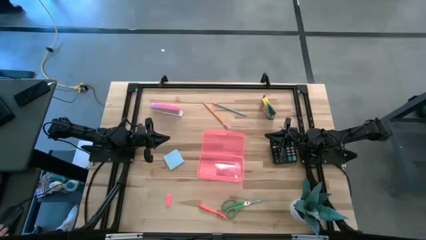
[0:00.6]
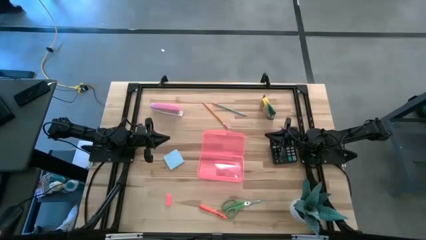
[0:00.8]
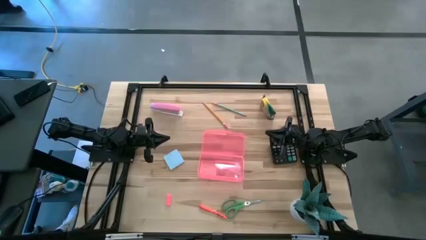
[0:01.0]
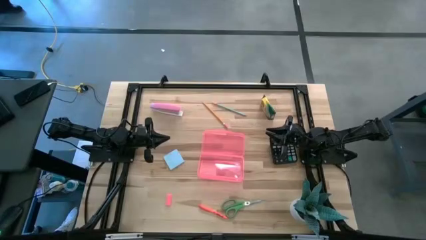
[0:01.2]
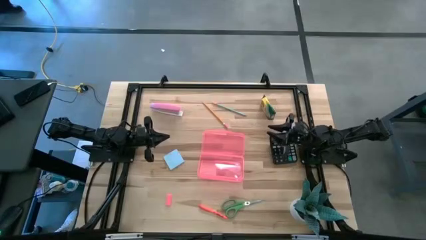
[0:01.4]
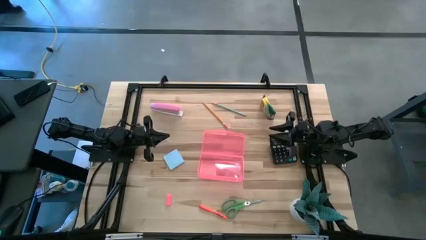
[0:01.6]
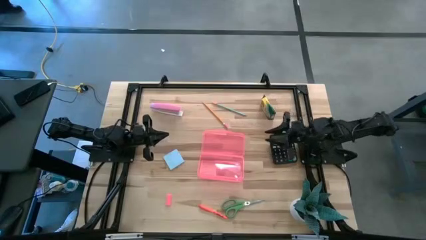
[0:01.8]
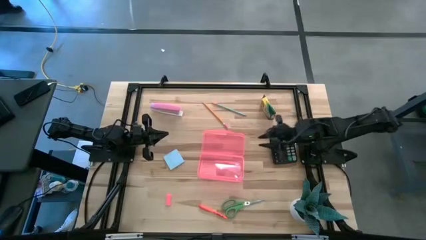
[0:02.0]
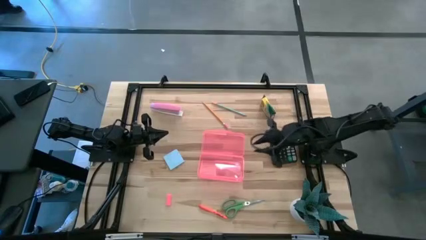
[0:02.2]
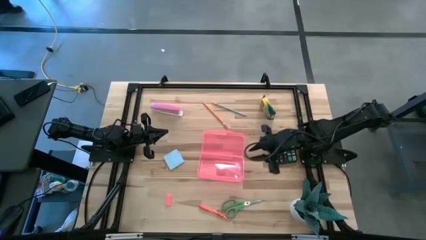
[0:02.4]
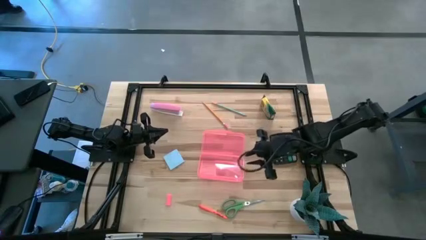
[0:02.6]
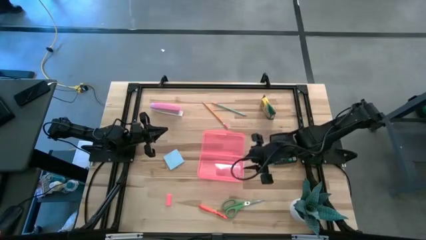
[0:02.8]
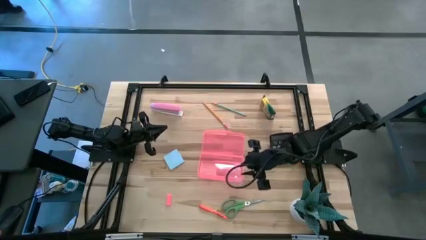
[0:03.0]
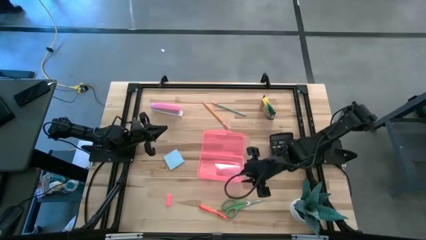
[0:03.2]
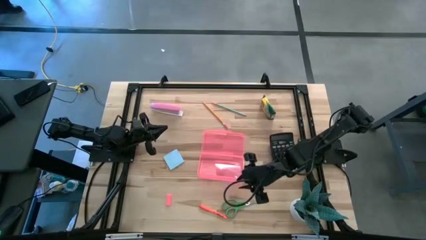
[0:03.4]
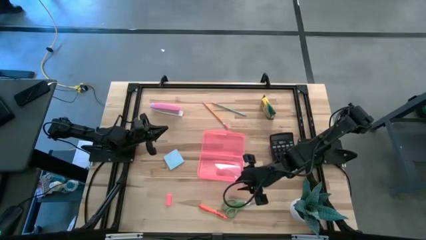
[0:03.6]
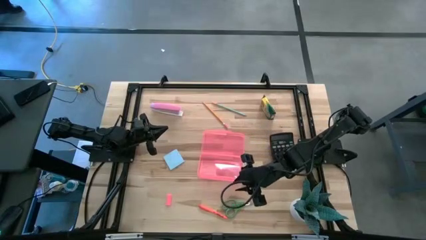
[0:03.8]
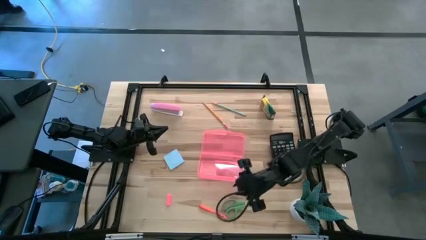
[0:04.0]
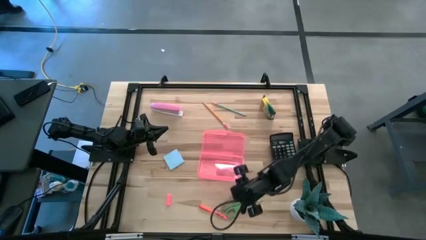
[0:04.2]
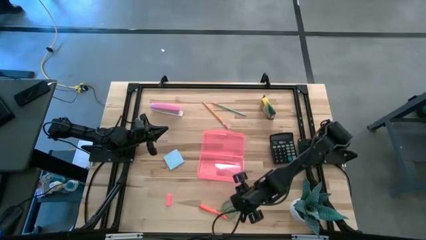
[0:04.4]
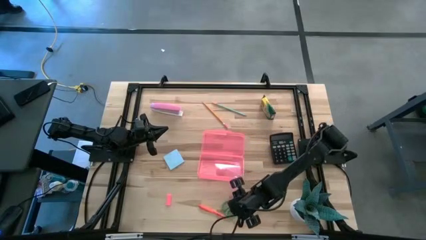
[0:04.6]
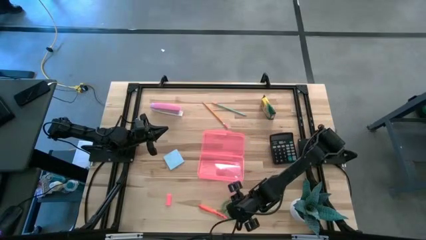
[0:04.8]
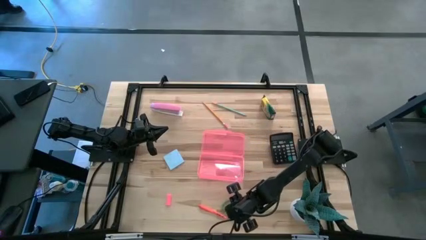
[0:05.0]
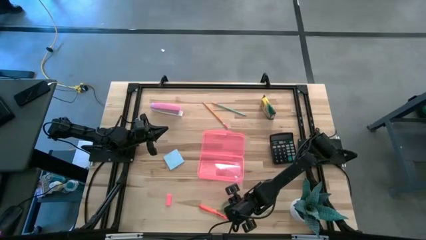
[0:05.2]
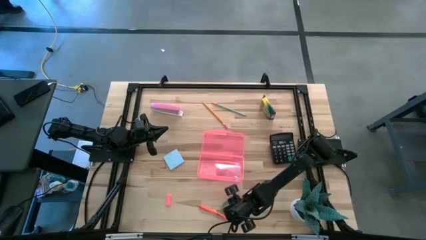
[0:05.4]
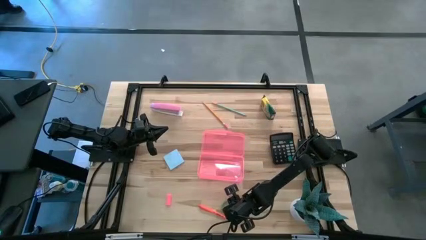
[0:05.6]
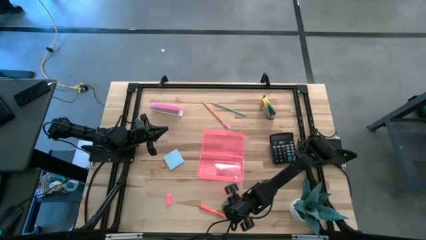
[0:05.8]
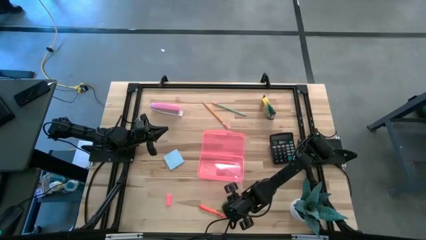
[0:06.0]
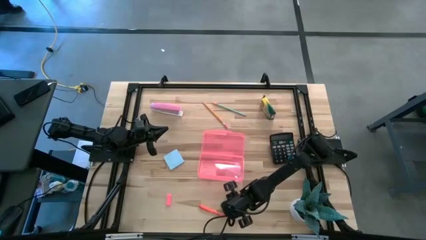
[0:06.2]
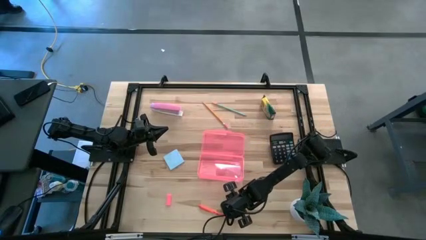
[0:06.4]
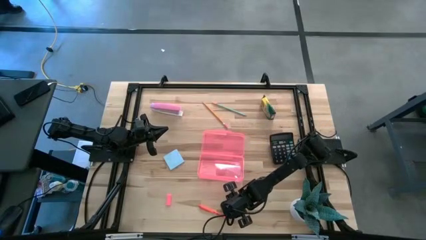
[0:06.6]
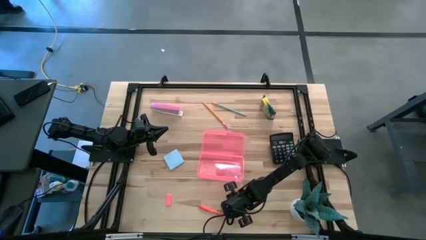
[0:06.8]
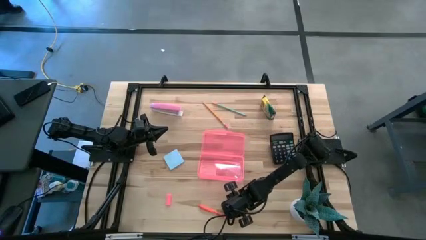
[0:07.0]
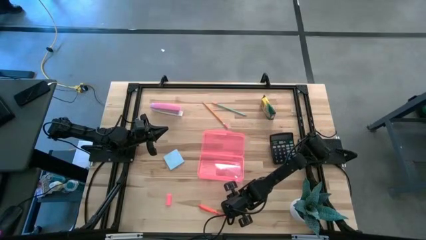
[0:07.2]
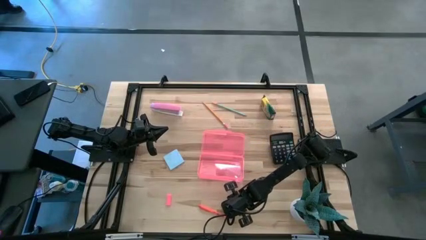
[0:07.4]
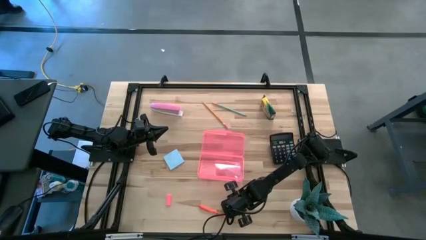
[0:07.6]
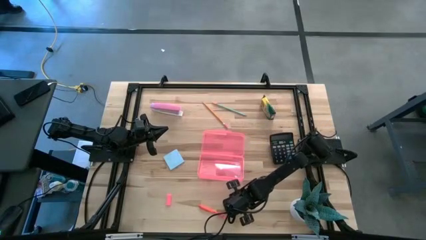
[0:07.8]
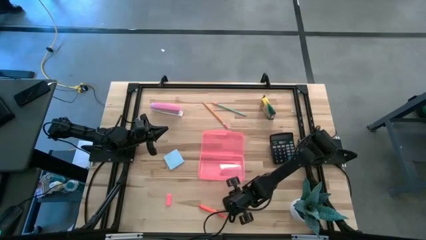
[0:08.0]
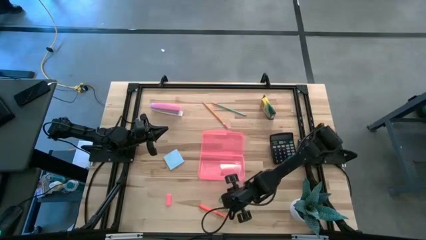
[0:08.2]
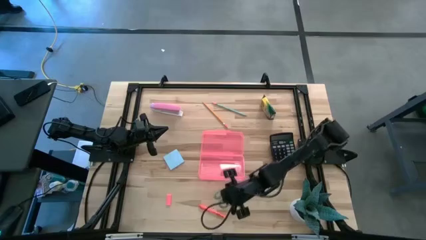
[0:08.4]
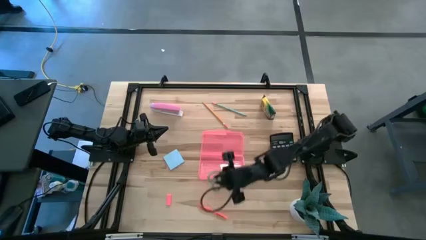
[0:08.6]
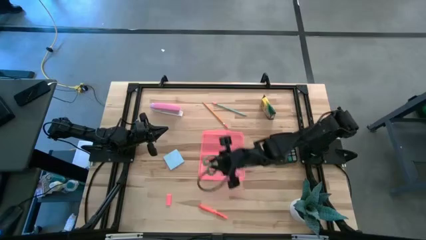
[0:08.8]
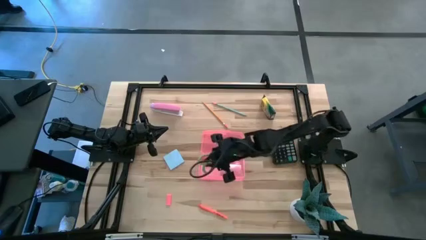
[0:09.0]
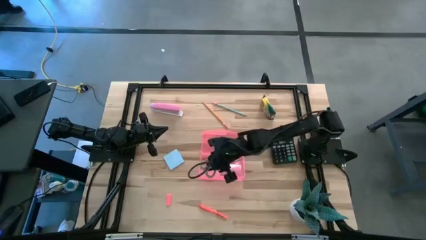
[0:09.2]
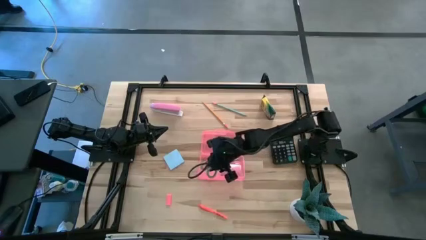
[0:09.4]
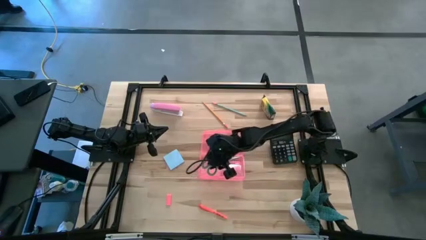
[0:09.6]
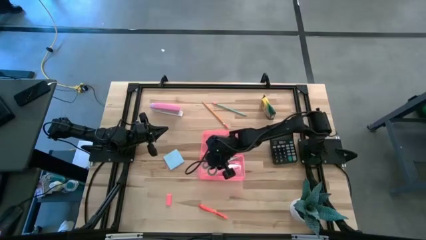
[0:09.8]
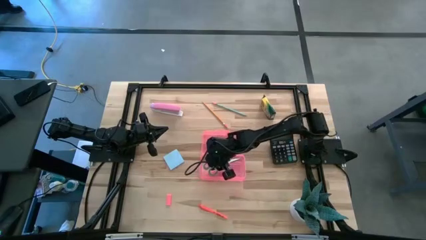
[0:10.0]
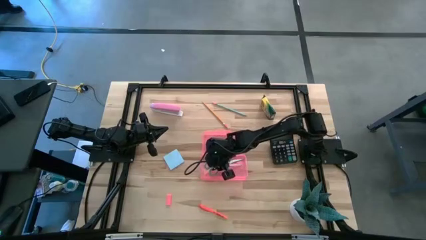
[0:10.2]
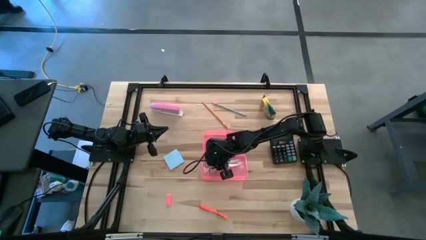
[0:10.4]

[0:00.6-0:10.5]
Task: Pack school essentials
Put the scissors into the supply box
